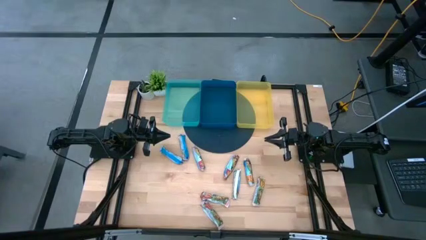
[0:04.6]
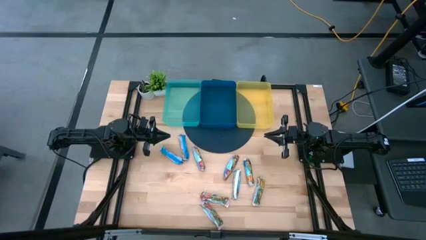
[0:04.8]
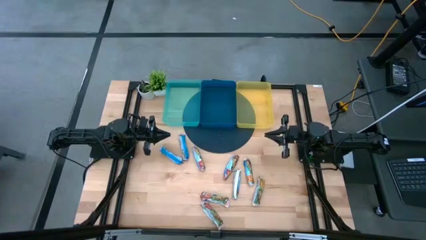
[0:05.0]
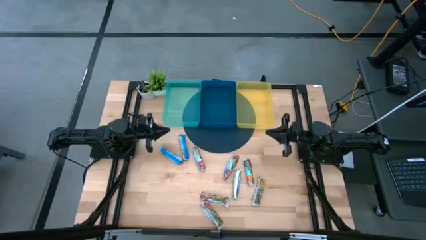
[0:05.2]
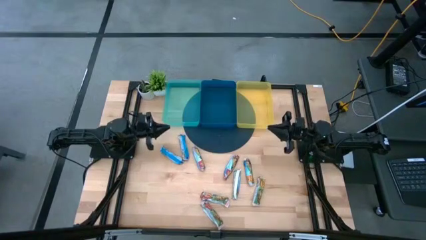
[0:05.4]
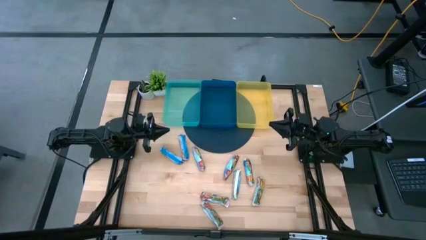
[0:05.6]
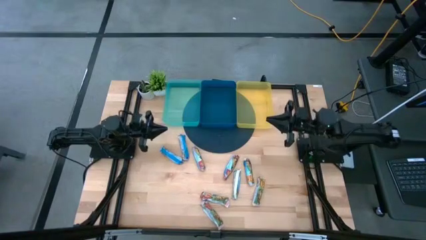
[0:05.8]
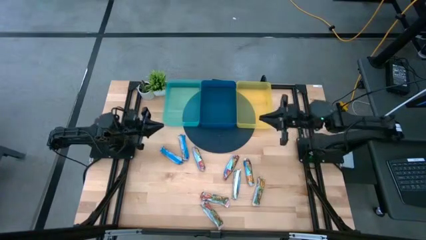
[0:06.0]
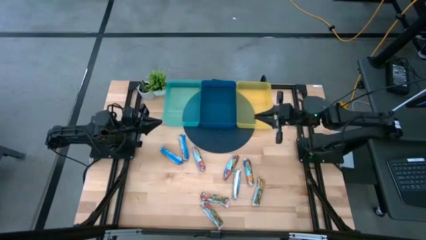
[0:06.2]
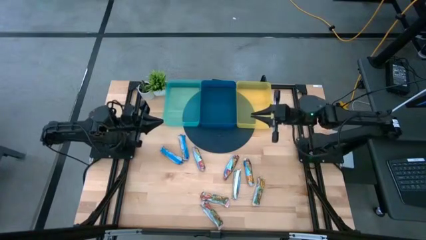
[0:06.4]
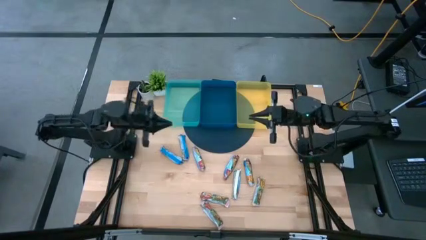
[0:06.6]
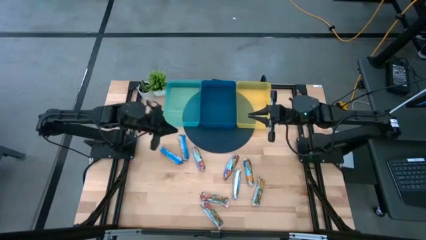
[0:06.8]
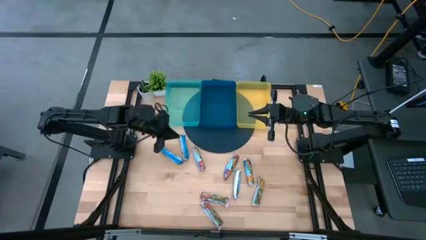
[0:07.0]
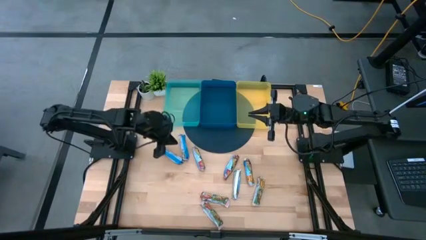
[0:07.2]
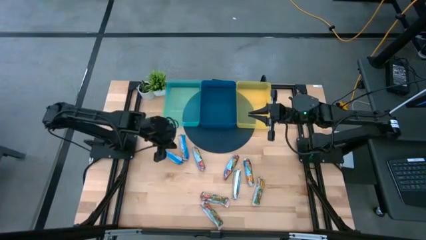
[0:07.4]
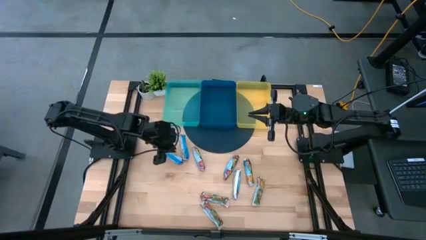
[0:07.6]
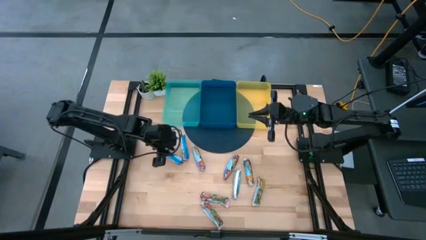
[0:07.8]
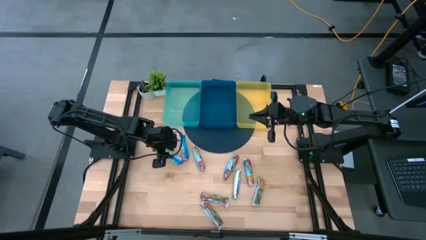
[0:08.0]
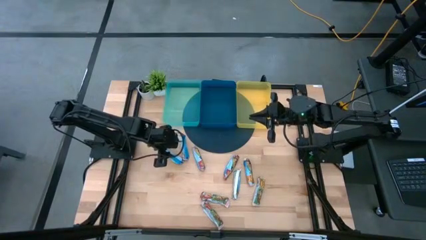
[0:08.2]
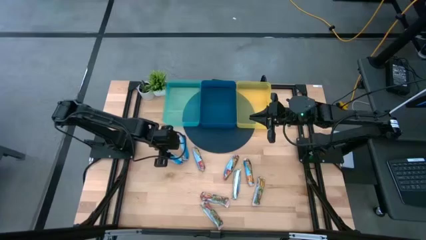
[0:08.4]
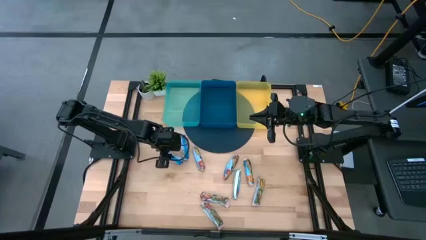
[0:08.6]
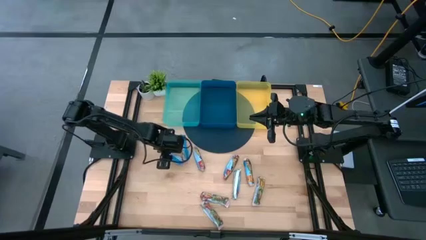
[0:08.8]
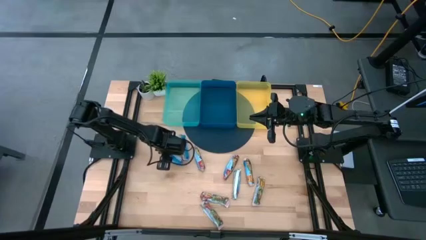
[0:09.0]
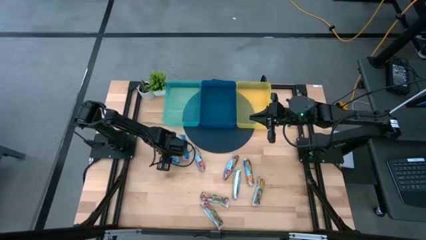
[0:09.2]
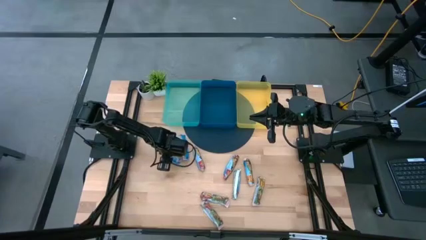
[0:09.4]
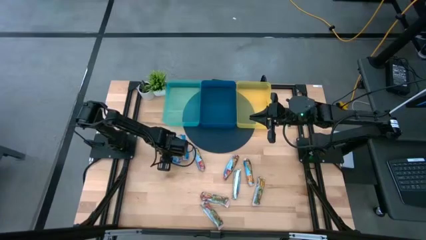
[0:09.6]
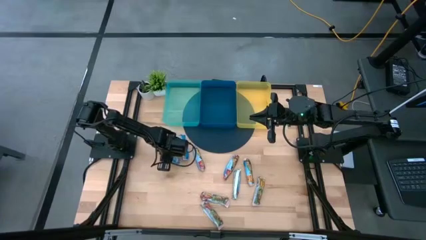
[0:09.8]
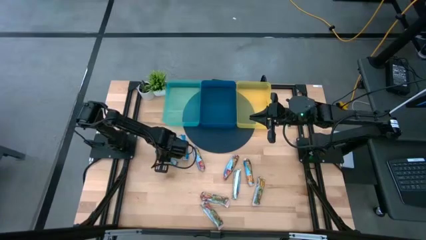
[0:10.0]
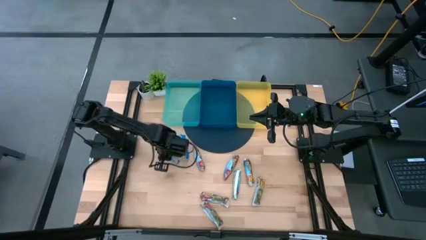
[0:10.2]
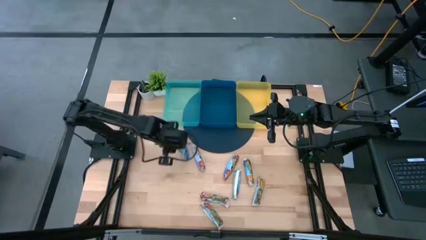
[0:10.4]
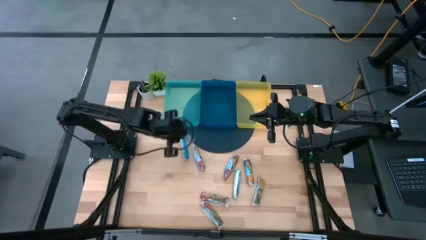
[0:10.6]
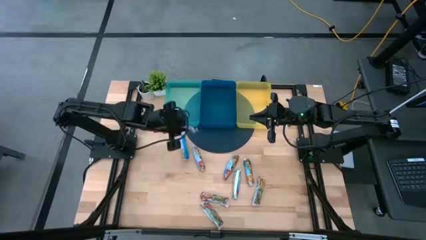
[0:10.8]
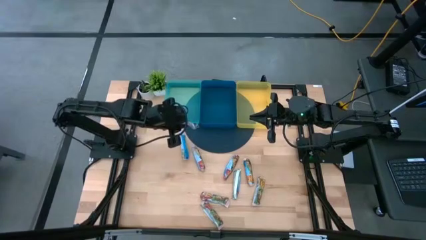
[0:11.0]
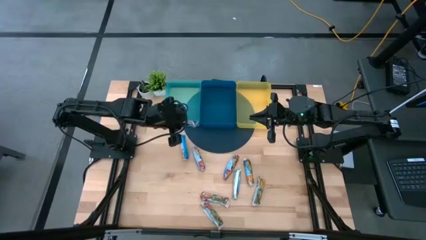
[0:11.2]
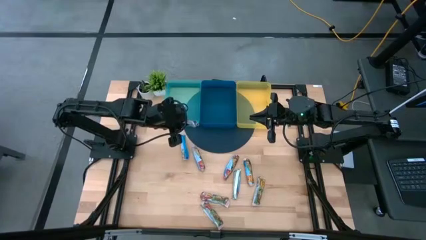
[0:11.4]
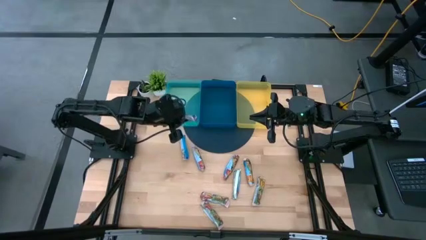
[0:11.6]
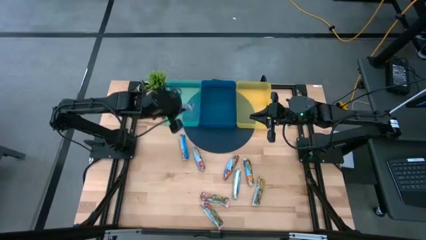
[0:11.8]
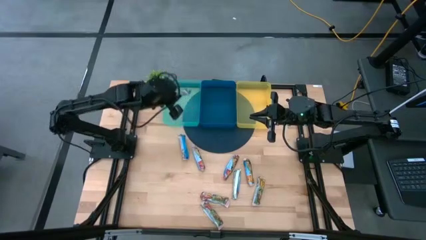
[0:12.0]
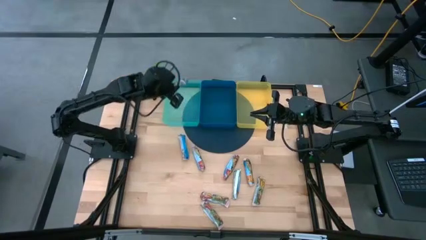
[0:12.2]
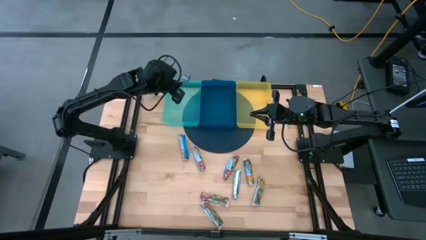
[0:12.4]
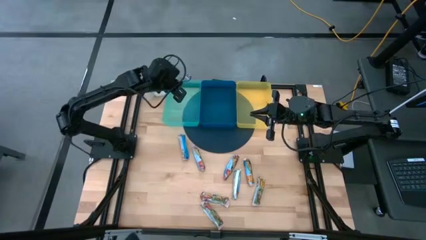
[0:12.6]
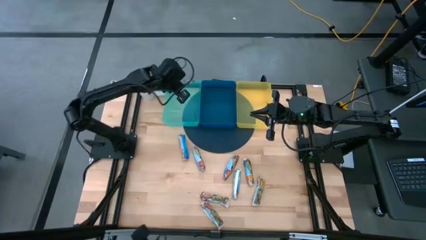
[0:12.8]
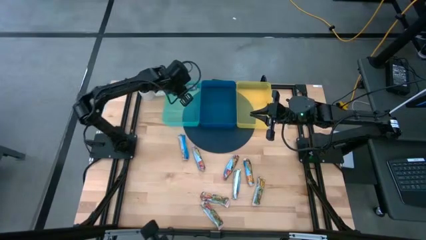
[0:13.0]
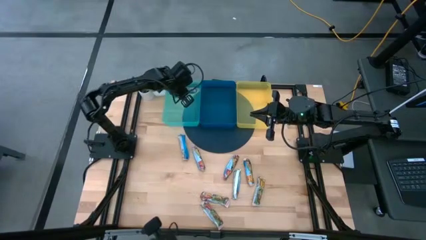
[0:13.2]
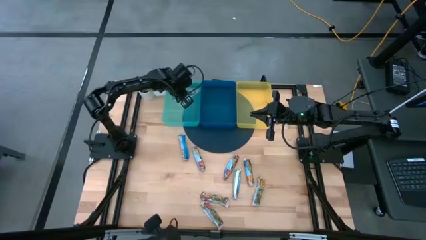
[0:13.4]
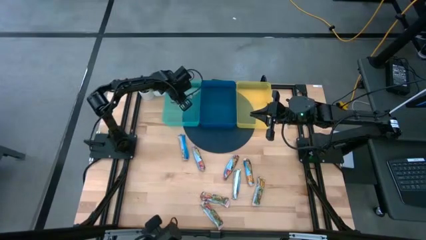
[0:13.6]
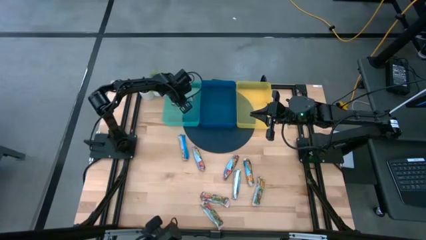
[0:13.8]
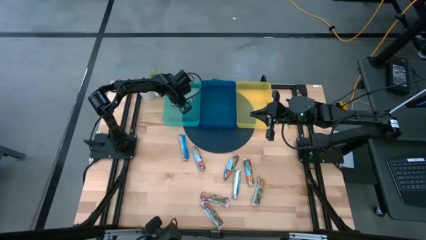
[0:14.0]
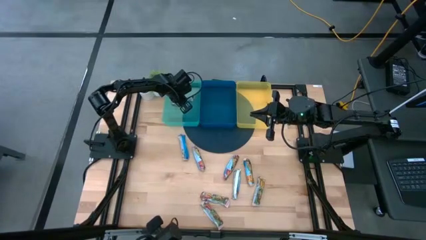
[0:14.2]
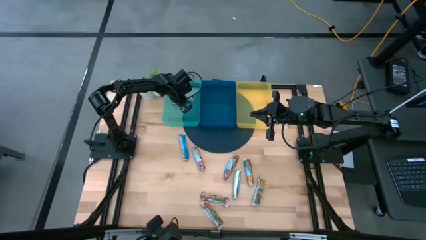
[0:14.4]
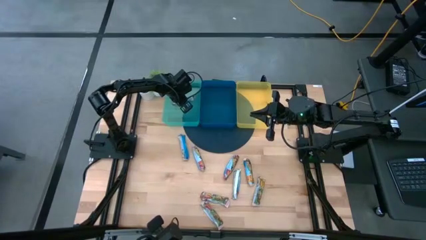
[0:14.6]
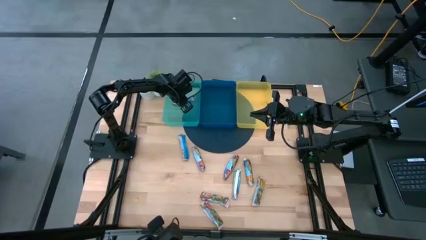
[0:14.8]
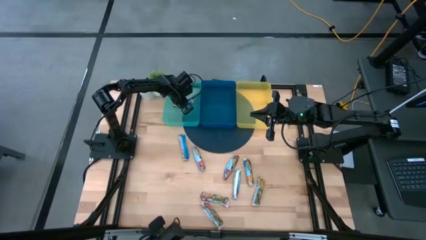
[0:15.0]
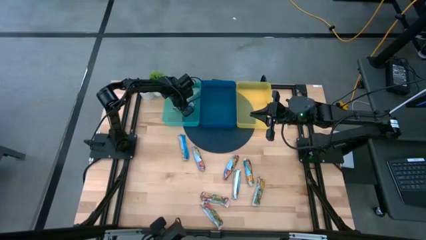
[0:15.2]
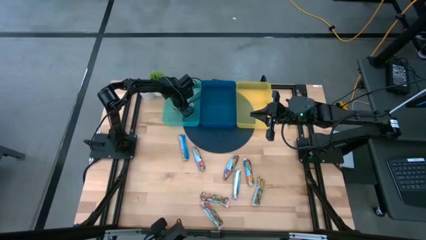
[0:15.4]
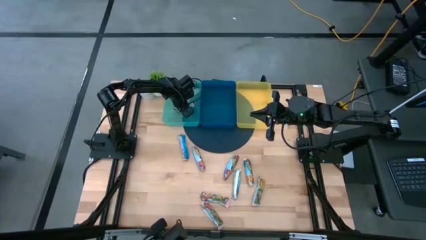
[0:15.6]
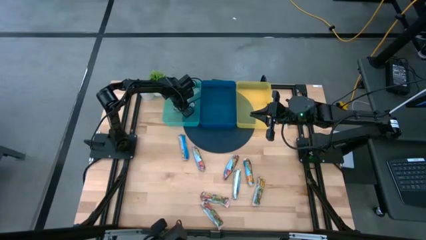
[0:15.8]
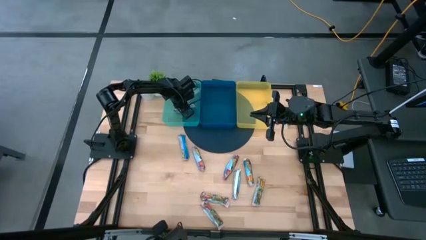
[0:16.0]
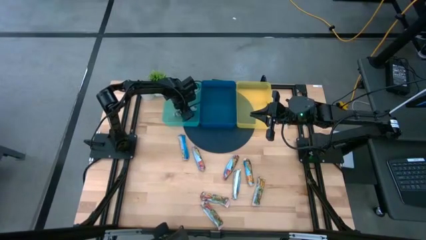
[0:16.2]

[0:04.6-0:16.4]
Task: Pick and place Granola Bars by type
Put the left blue granola bar into the light blue bin
